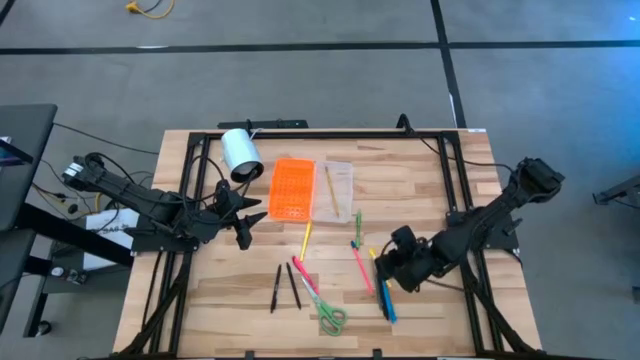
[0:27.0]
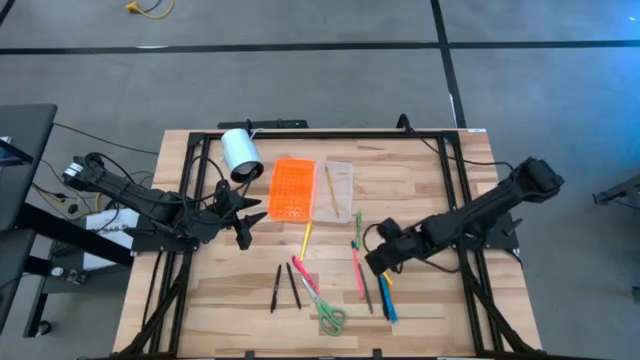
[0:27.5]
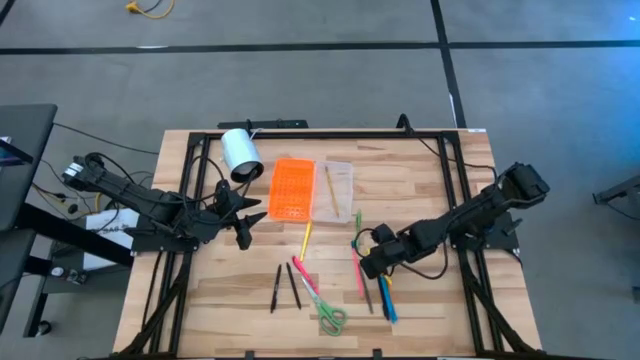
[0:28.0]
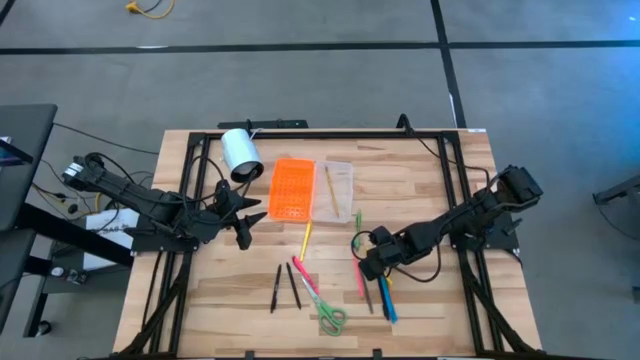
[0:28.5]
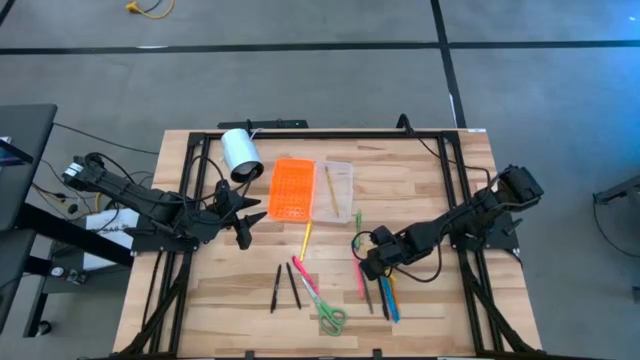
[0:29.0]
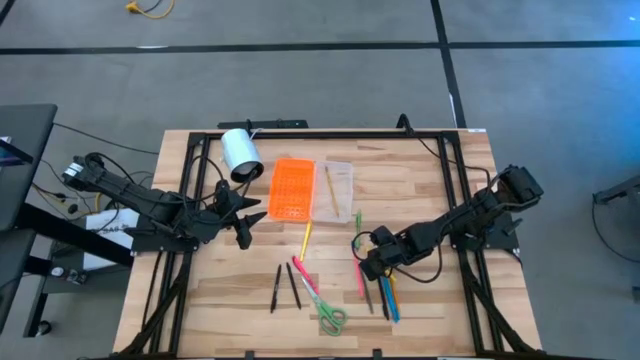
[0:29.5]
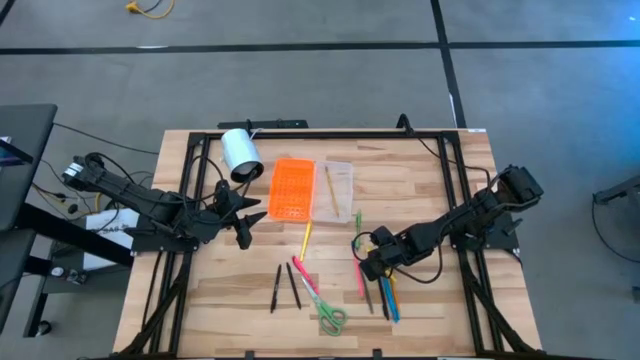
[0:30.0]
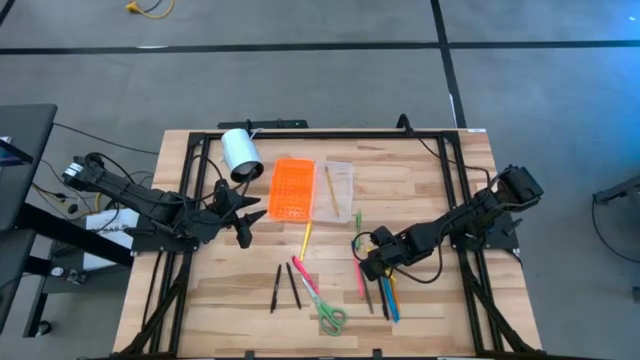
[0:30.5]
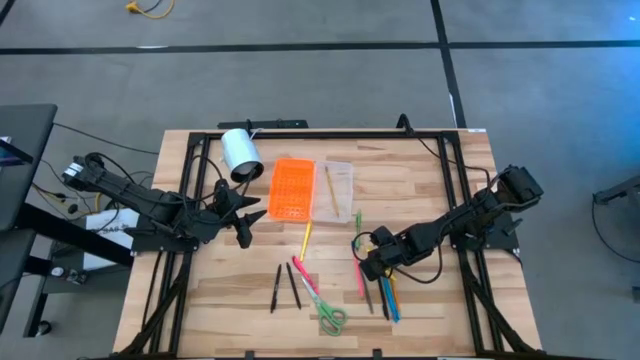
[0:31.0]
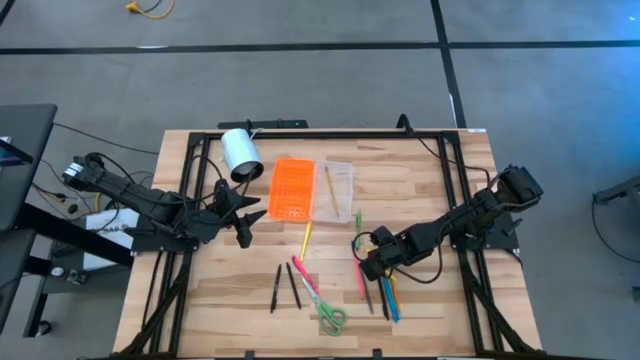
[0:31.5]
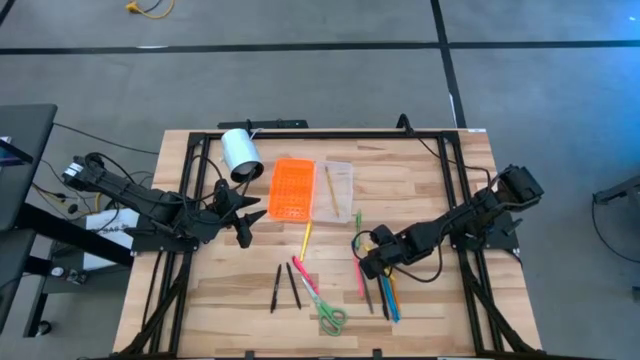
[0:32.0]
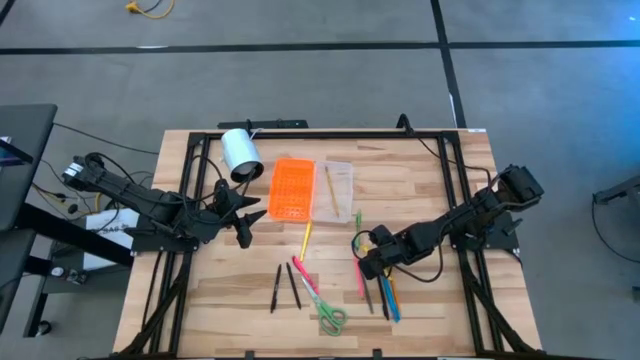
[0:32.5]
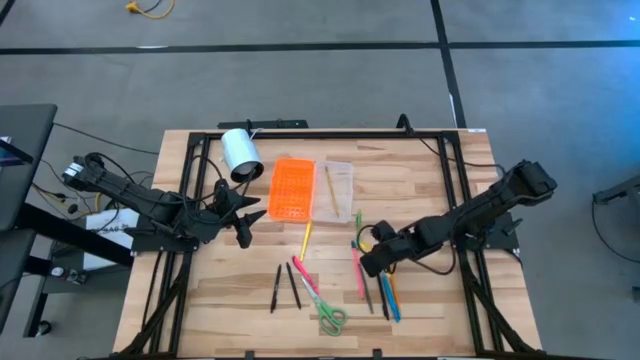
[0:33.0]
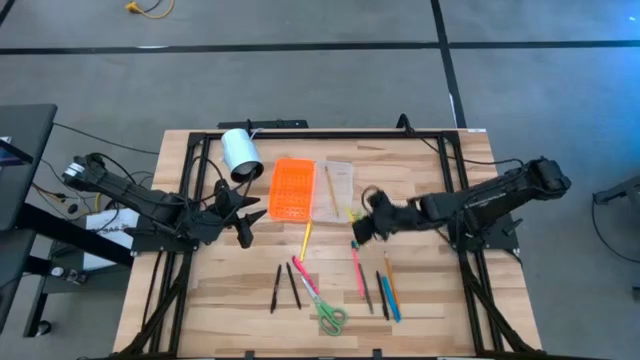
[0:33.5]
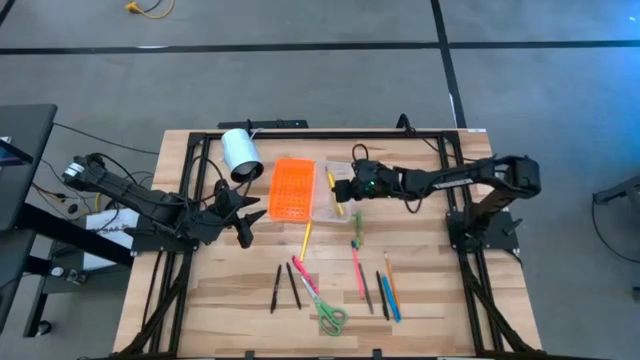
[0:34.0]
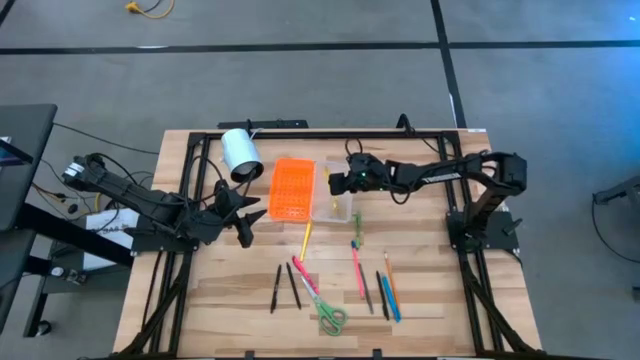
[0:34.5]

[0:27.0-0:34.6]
Task: Pick & place school supplies into a supply box
Put the right yellow pen into the orange supply box

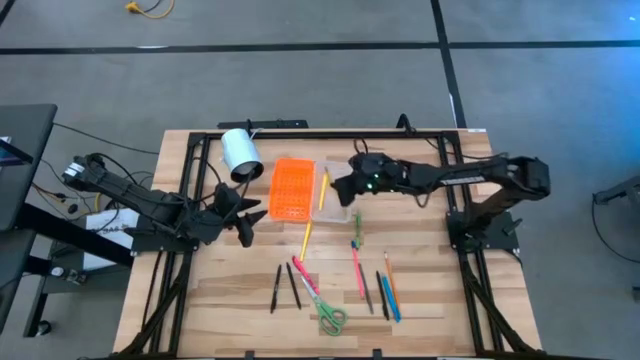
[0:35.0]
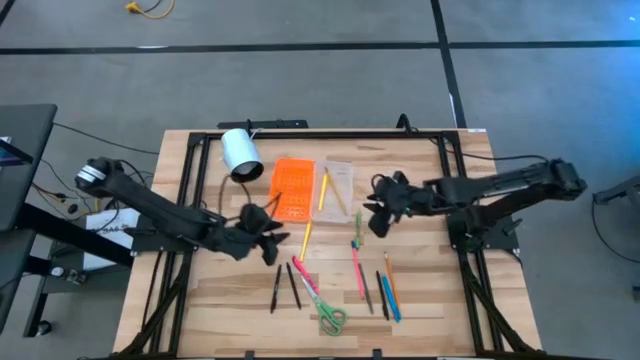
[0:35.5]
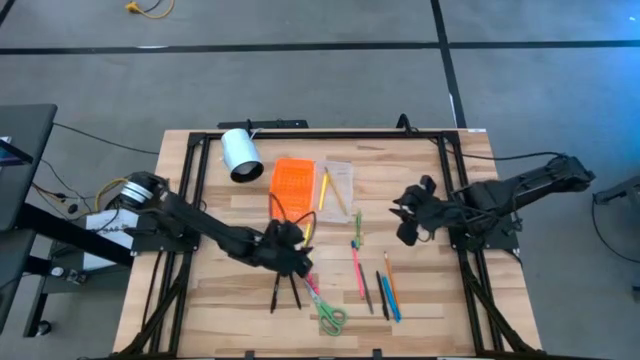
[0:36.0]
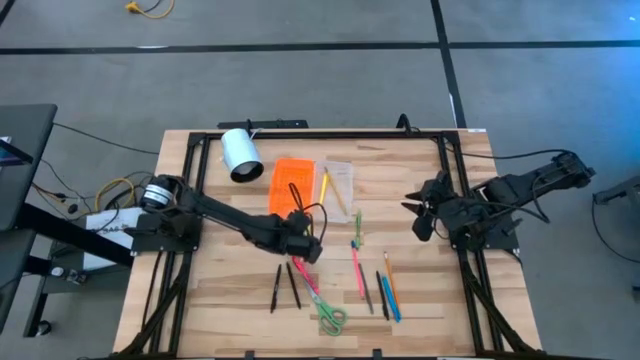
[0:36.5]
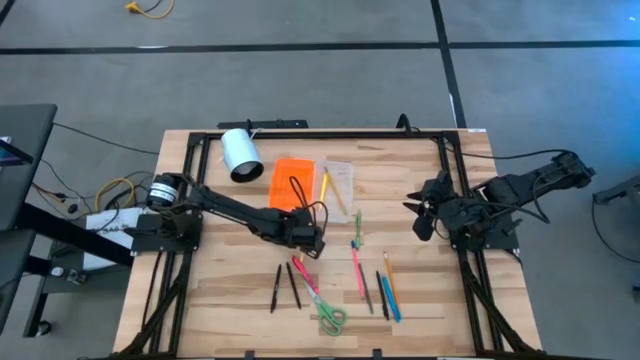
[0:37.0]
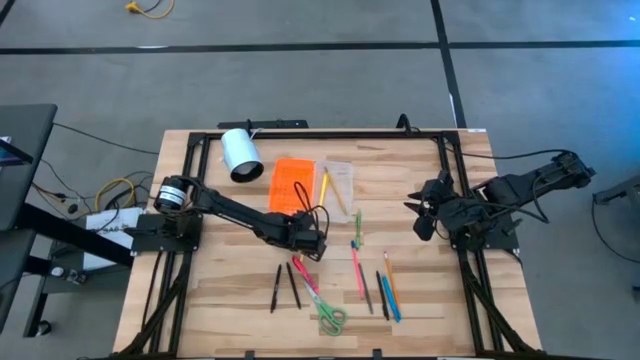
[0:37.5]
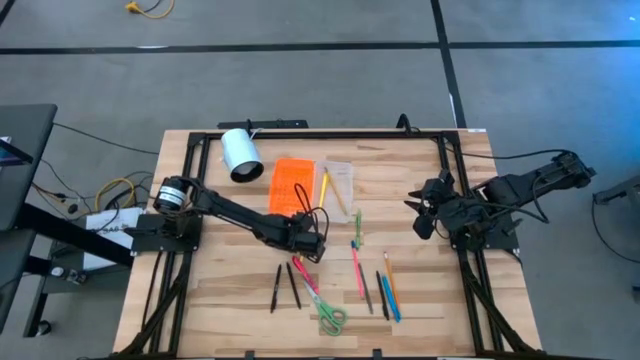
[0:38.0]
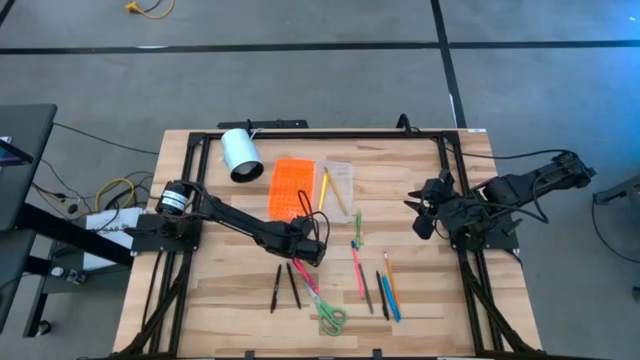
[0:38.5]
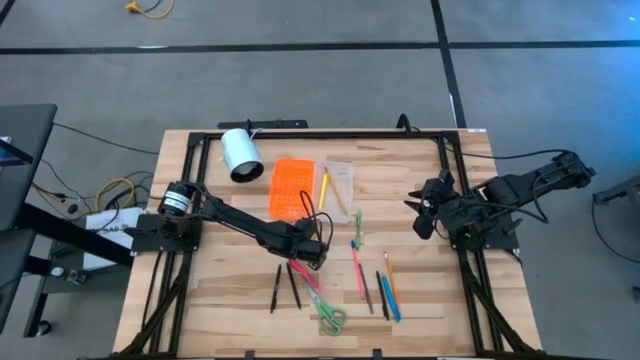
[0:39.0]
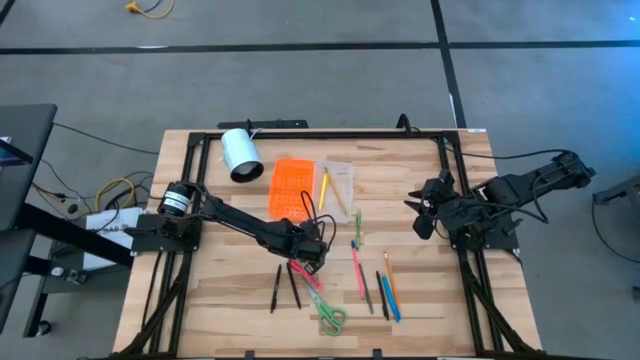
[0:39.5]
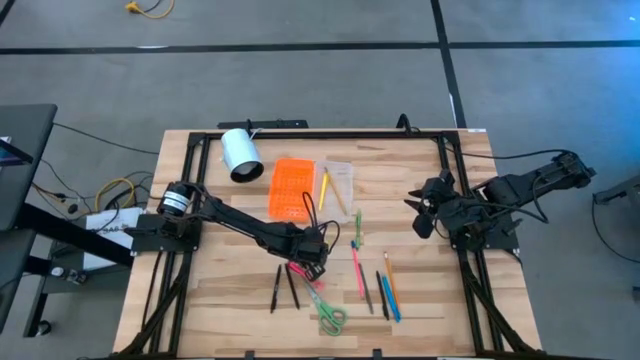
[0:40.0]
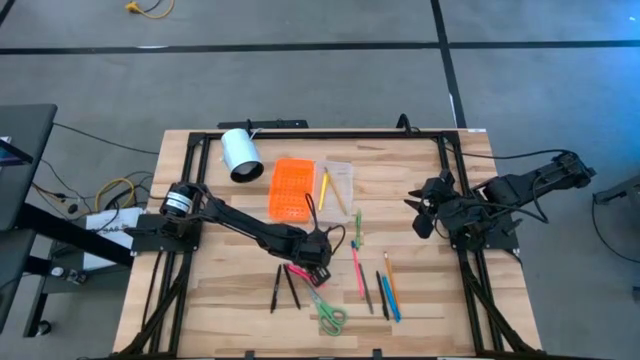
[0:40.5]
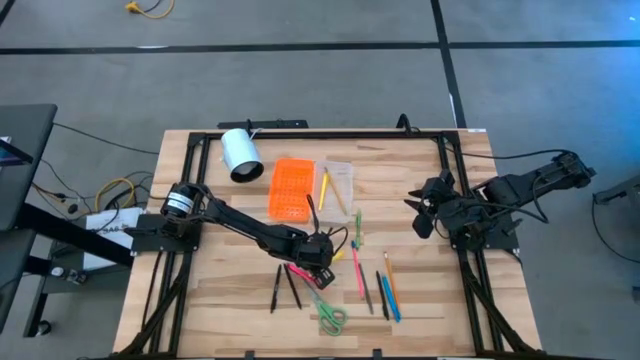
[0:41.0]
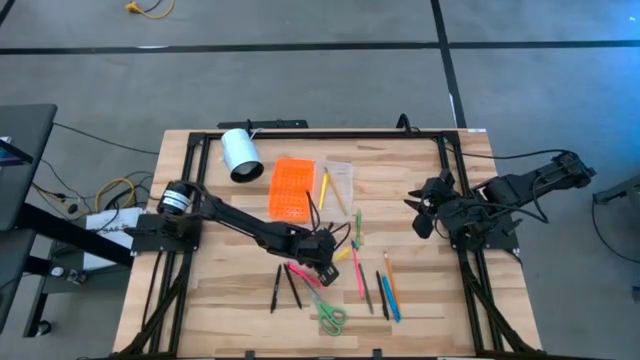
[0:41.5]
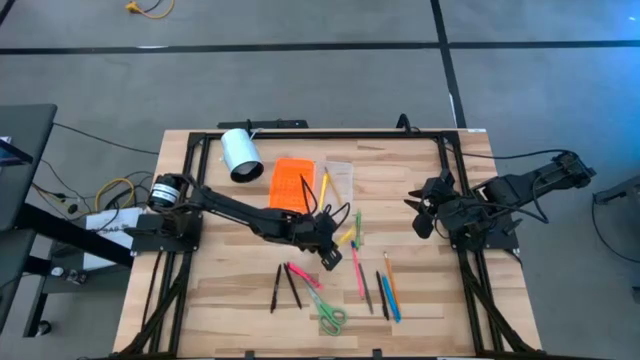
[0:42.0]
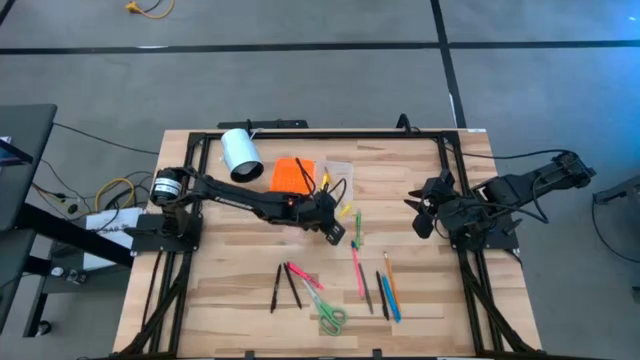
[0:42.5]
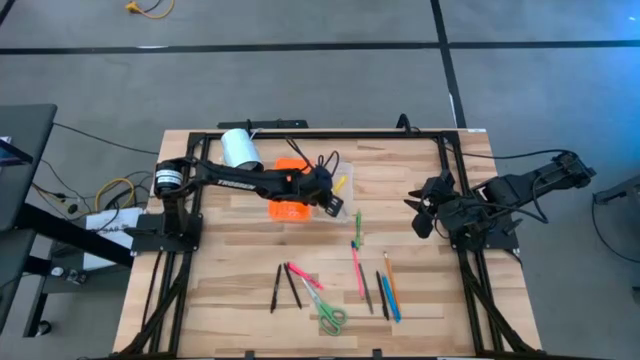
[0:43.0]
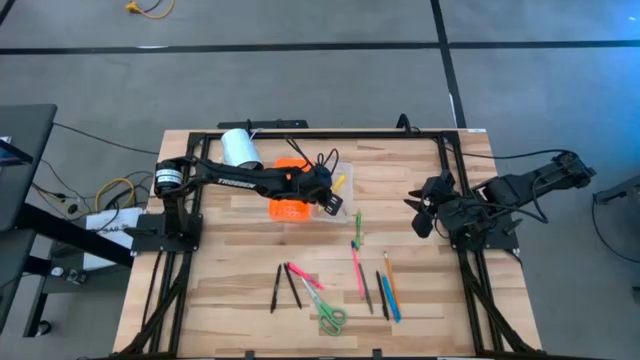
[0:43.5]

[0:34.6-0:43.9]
Put the yellow pen into the orange supply box

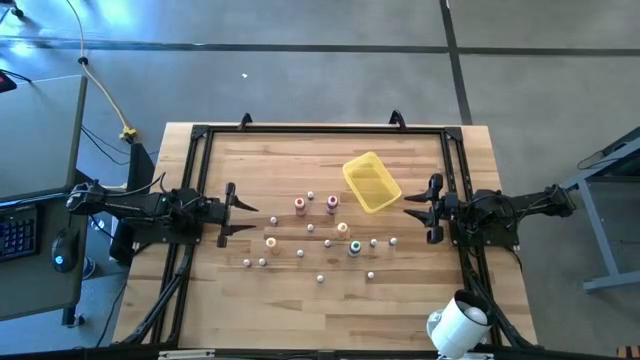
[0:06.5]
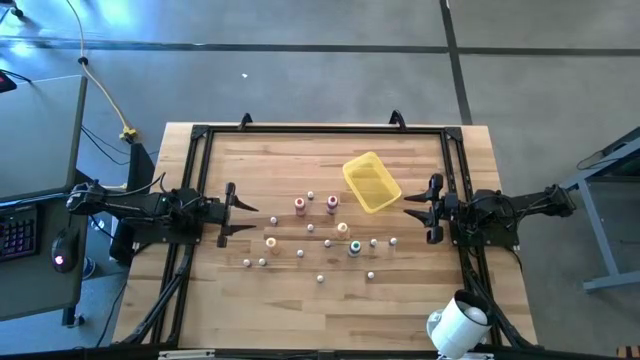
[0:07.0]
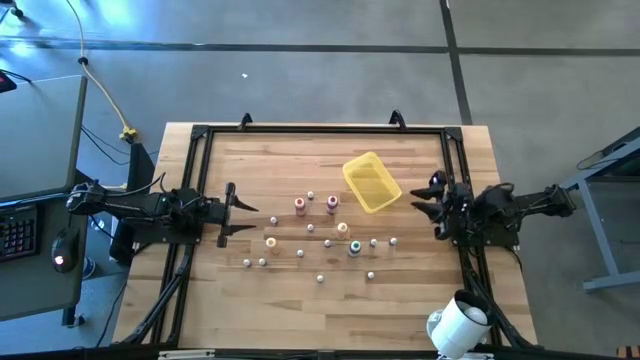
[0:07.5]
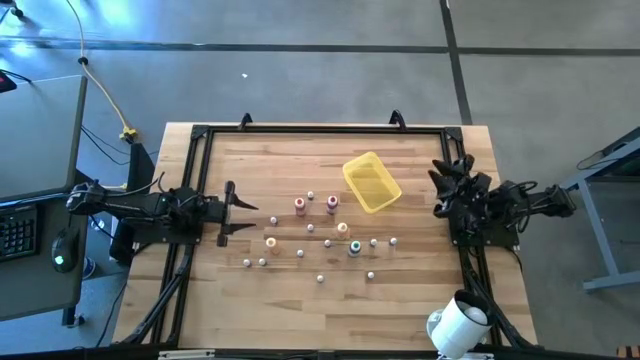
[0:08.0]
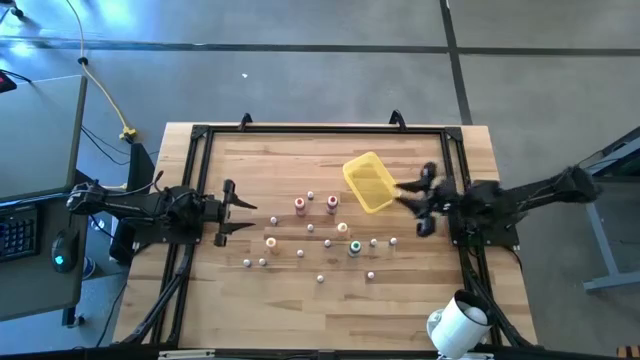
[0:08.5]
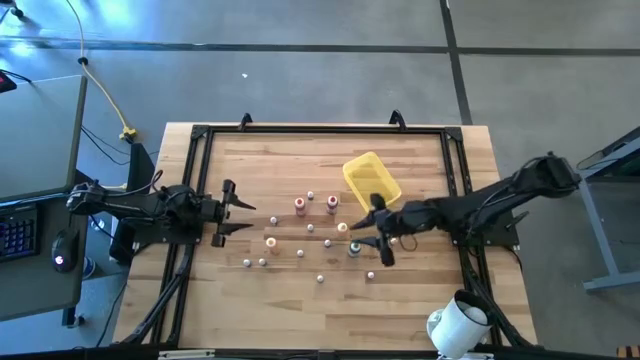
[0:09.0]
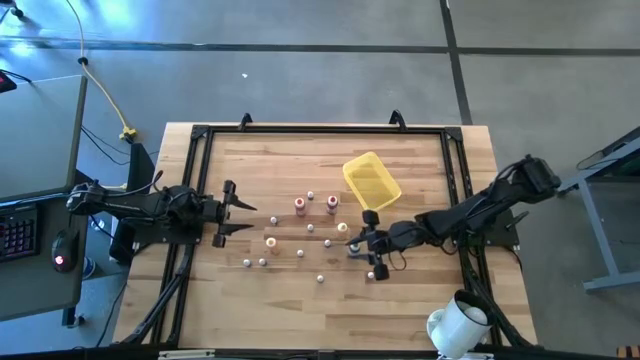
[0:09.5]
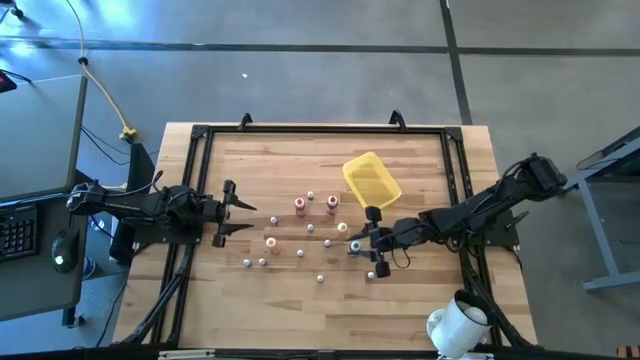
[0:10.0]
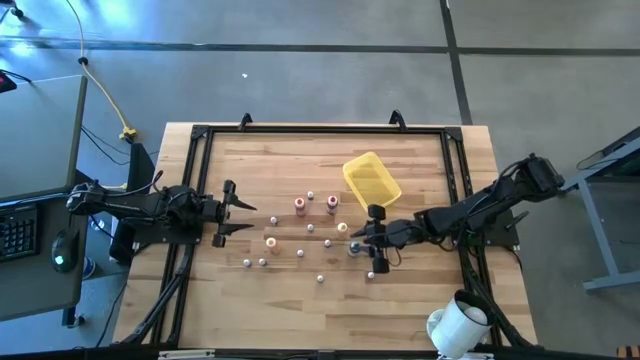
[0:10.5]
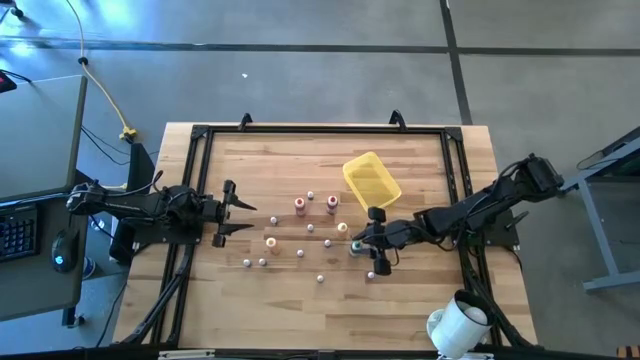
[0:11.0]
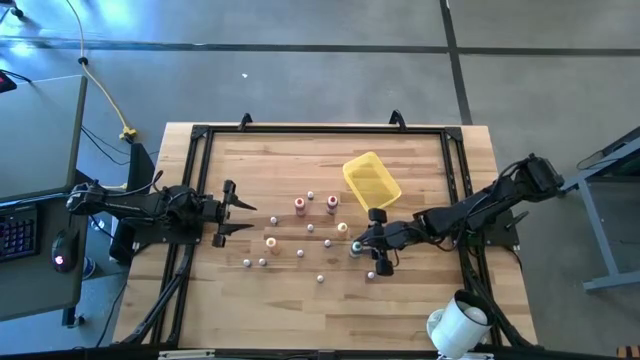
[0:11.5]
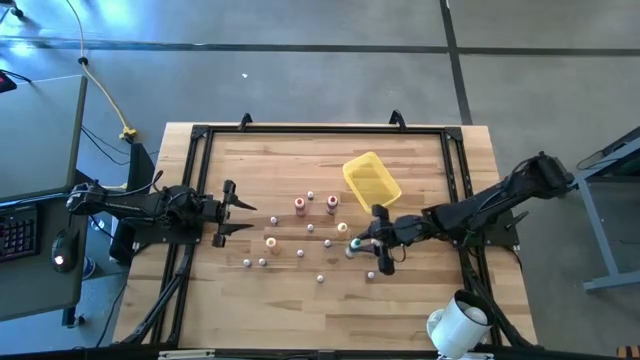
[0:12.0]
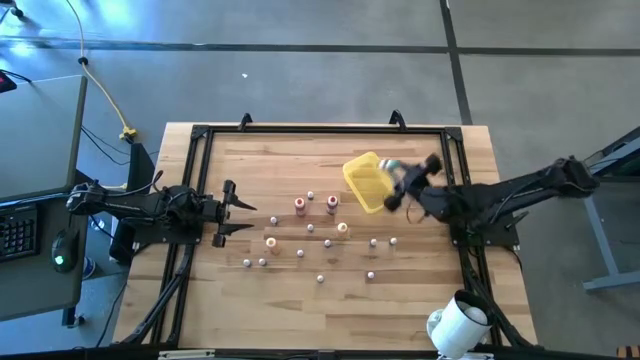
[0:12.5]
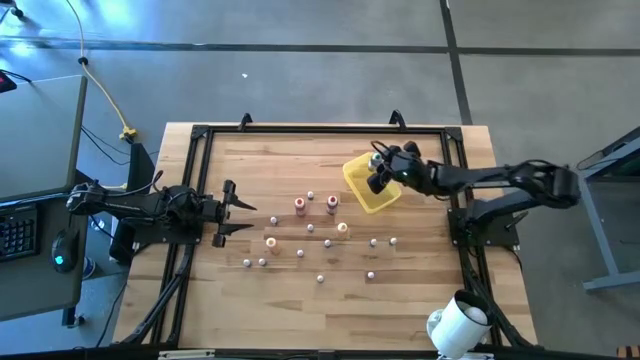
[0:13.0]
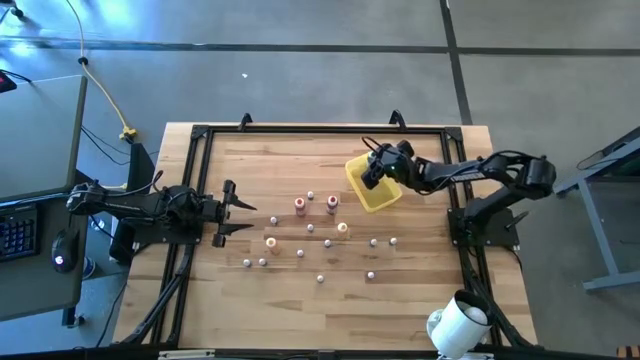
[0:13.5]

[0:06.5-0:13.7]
Task: Pick & Place food coloring
Put the large green food coloring bottle into the bin
